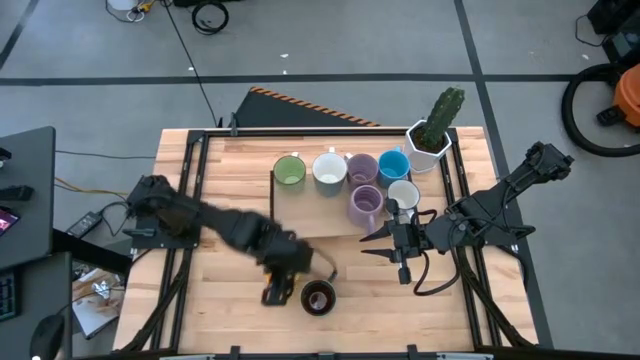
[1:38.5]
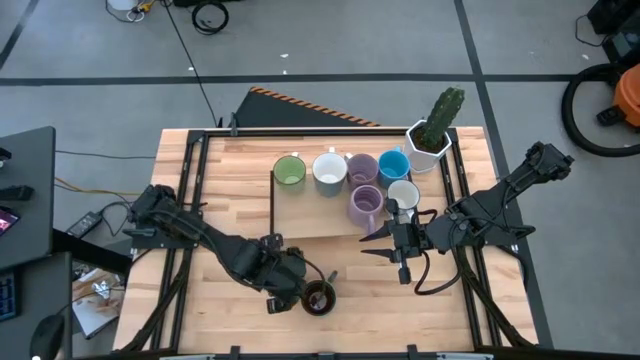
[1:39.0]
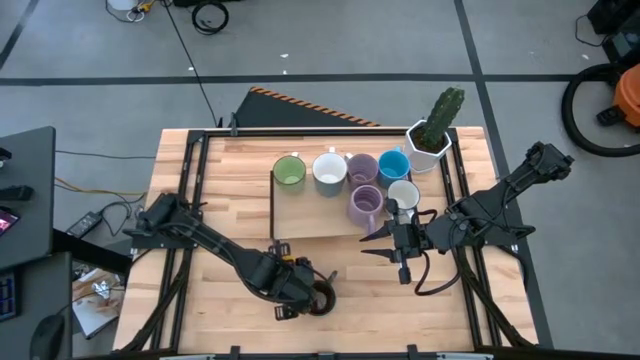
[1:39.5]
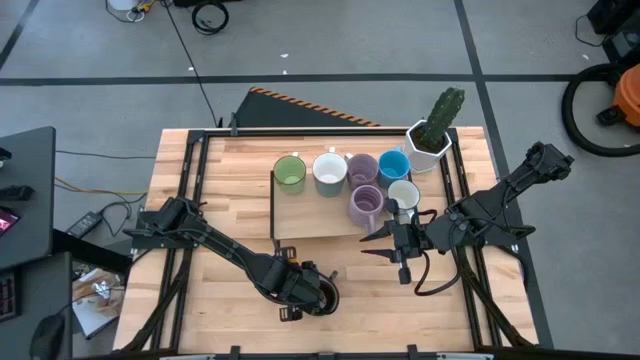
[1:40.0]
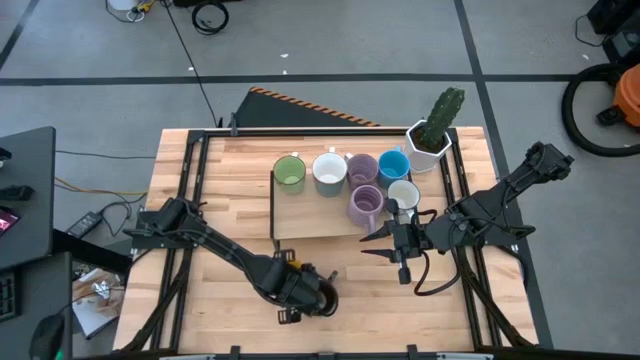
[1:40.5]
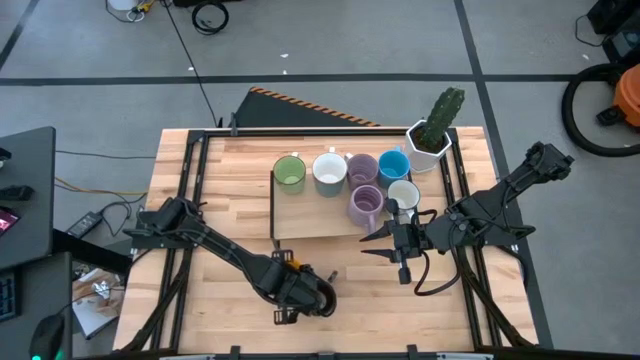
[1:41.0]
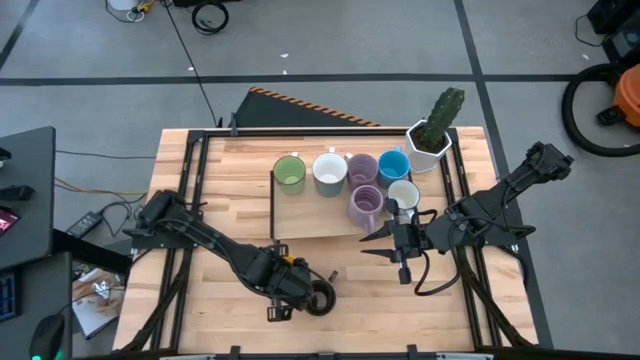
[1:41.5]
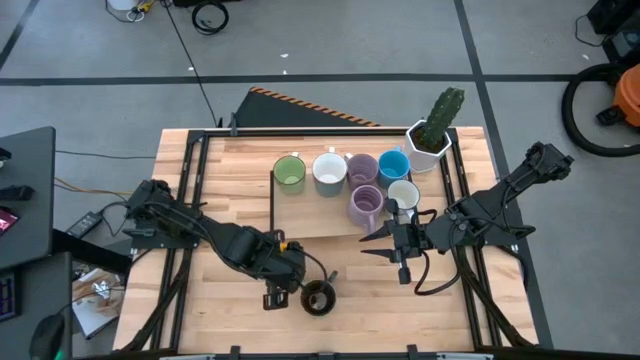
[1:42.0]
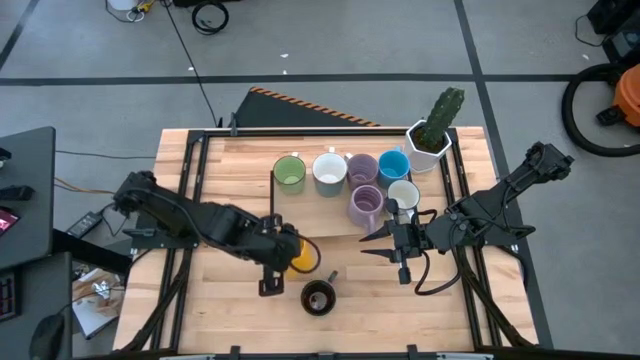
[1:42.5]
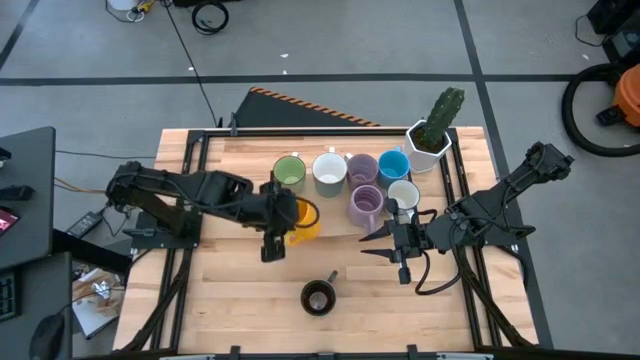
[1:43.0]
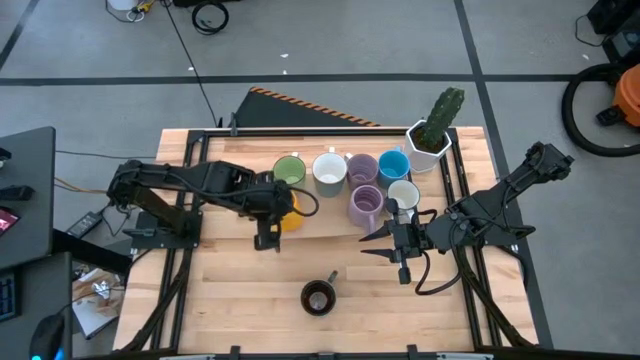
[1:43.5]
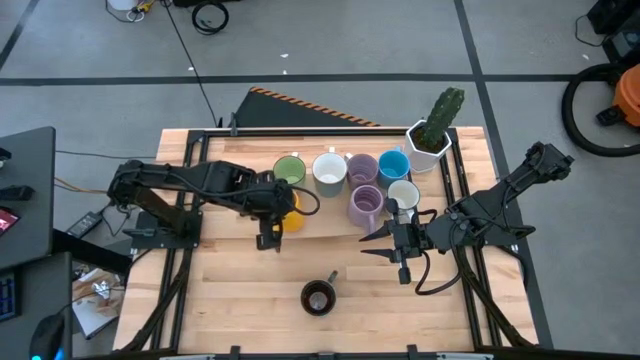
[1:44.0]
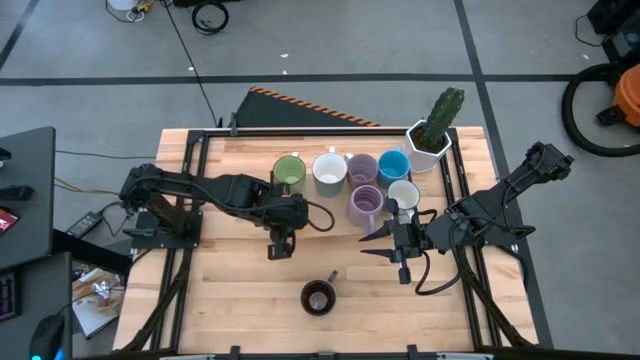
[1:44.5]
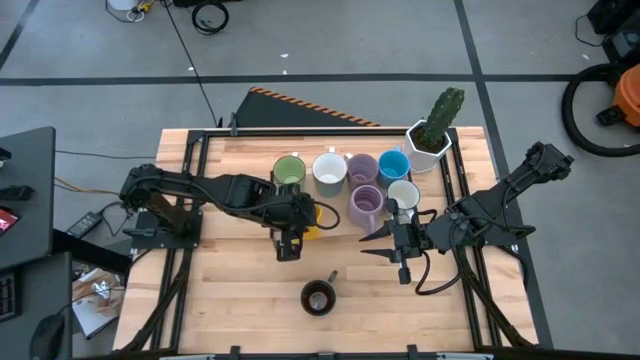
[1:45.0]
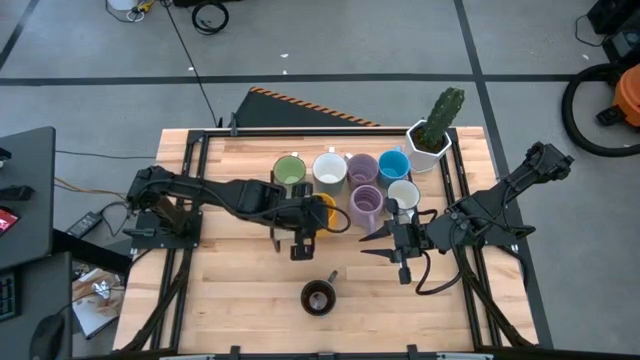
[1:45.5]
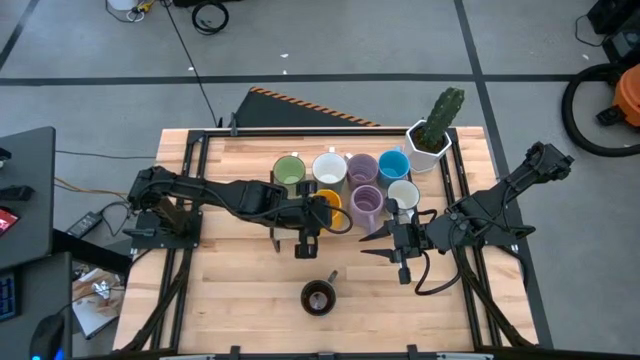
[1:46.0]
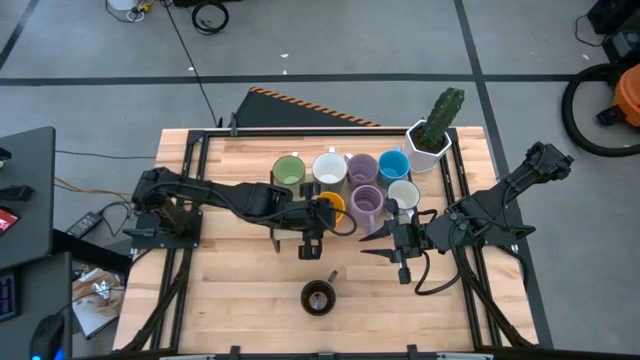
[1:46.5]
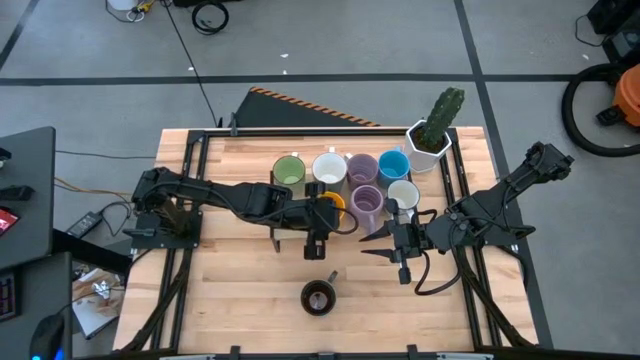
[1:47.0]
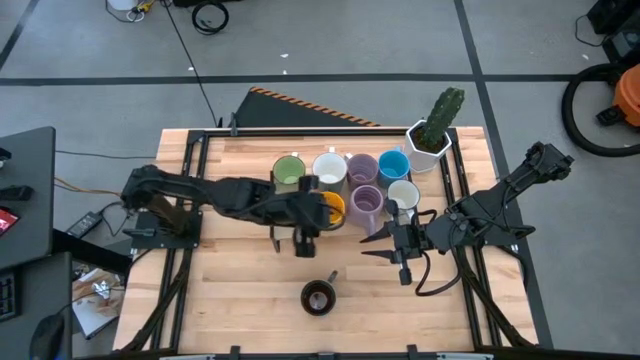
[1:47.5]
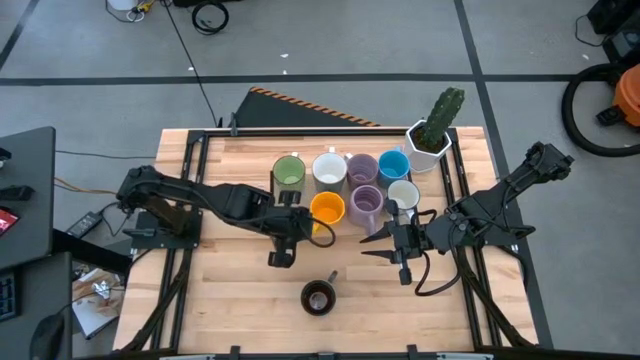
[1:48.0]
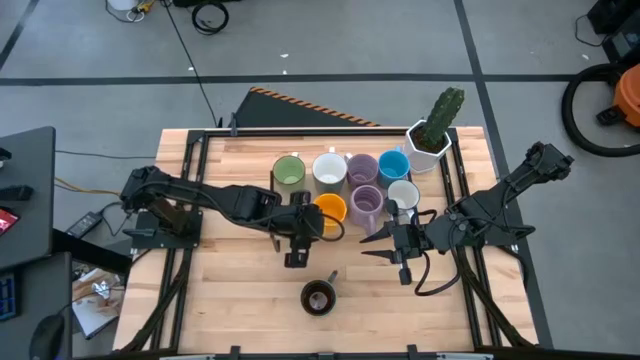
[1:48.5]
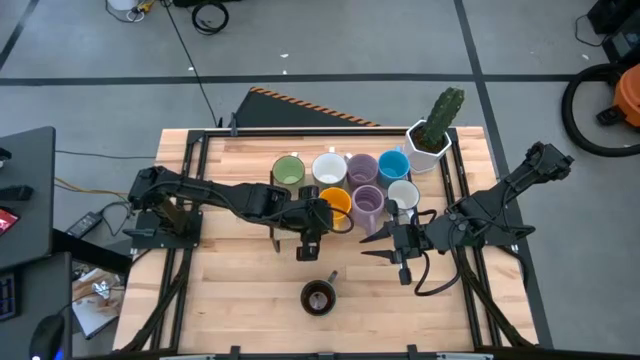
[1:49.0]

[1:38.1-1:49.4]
Task: Place coffee mugs
Put the yellow cup on the shelf aligned with the other light blue cup

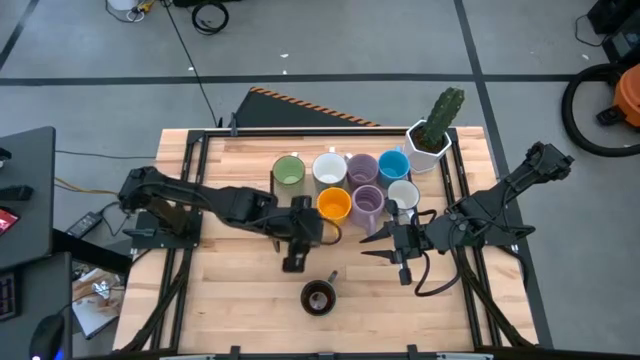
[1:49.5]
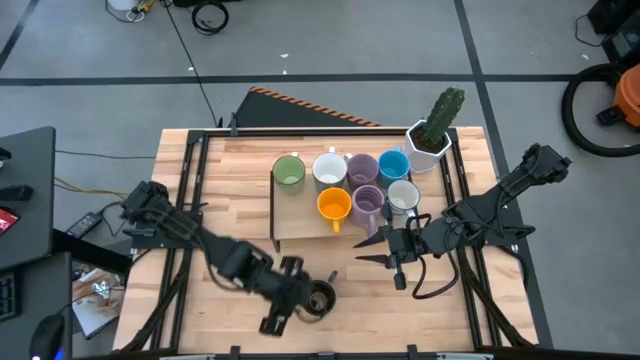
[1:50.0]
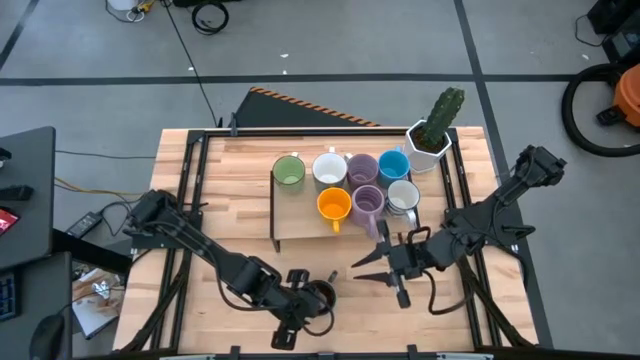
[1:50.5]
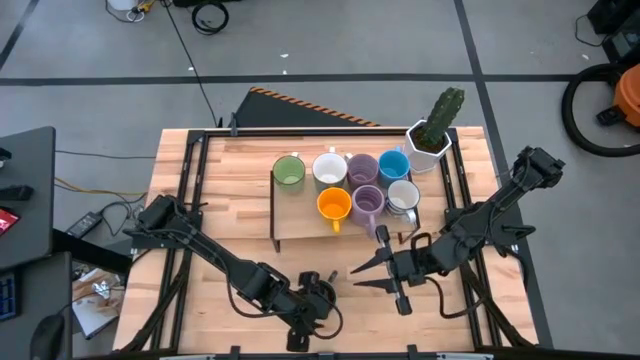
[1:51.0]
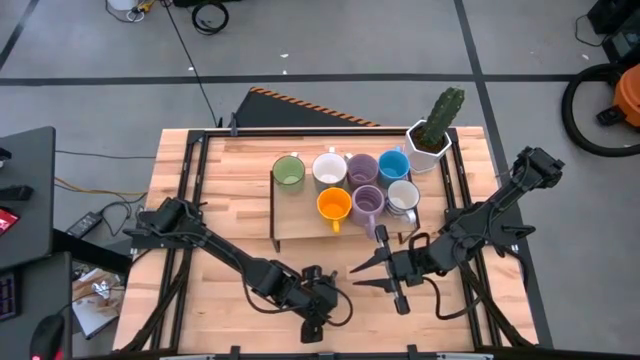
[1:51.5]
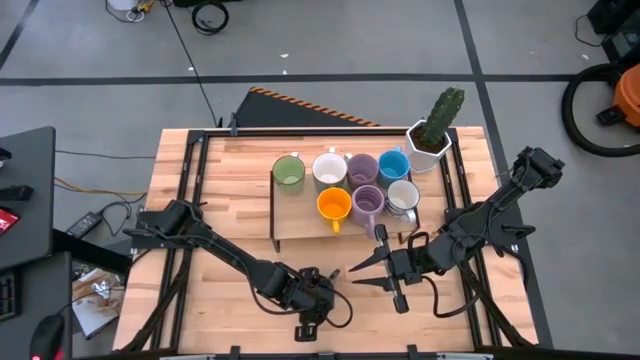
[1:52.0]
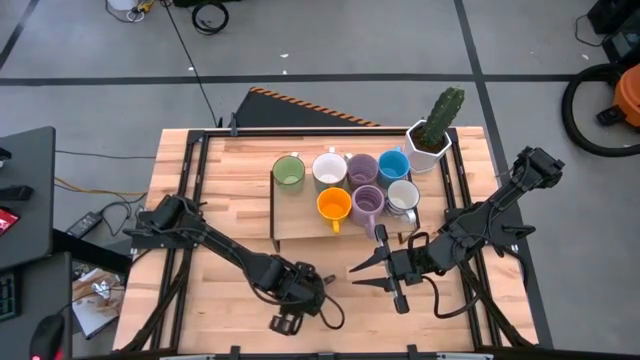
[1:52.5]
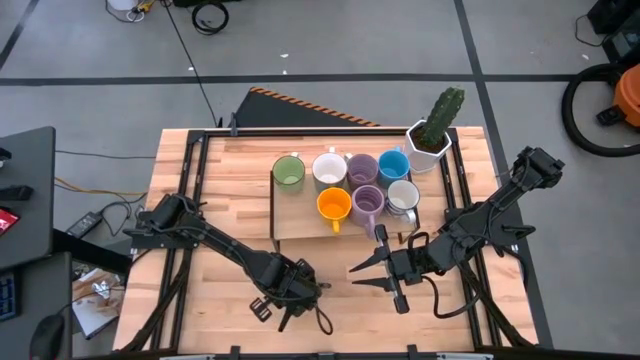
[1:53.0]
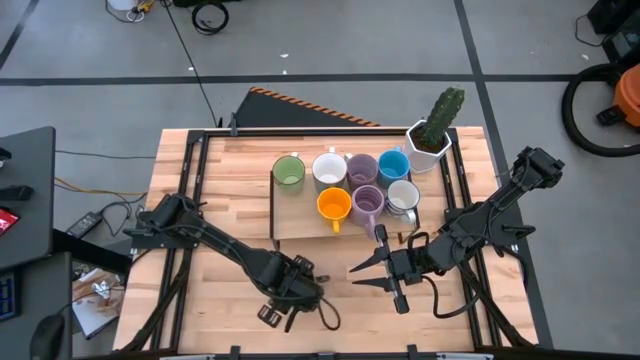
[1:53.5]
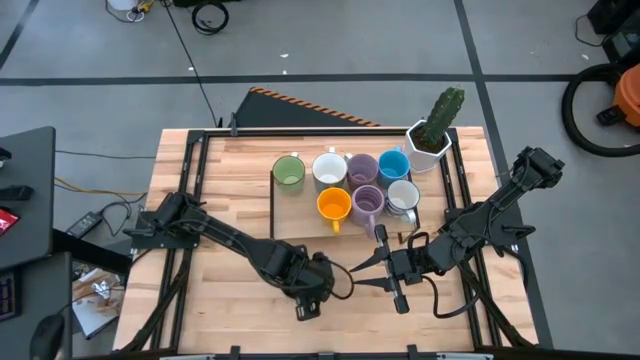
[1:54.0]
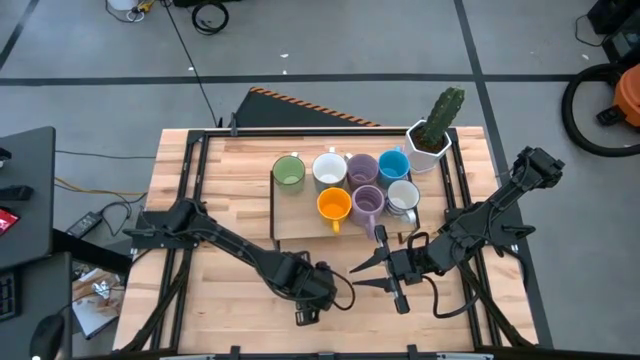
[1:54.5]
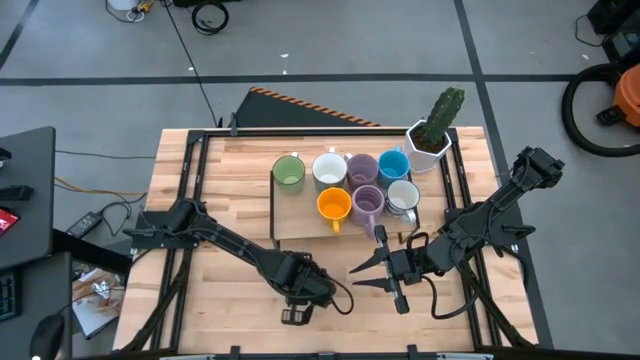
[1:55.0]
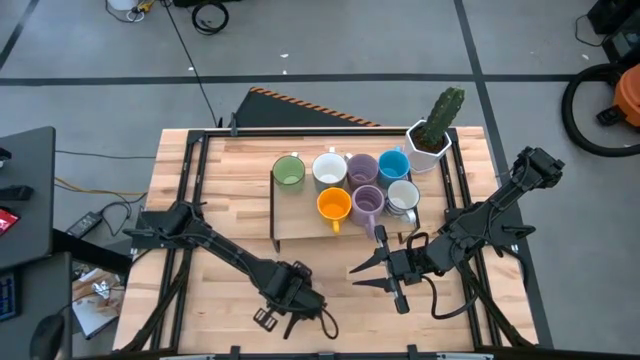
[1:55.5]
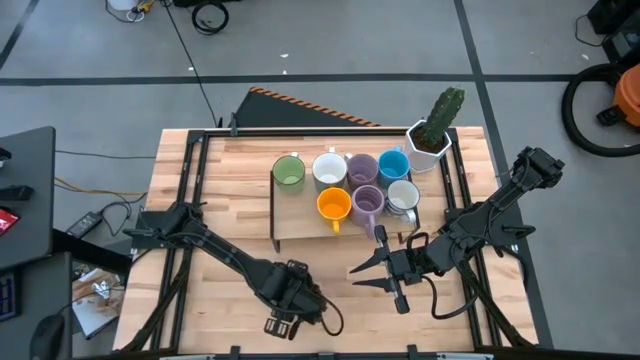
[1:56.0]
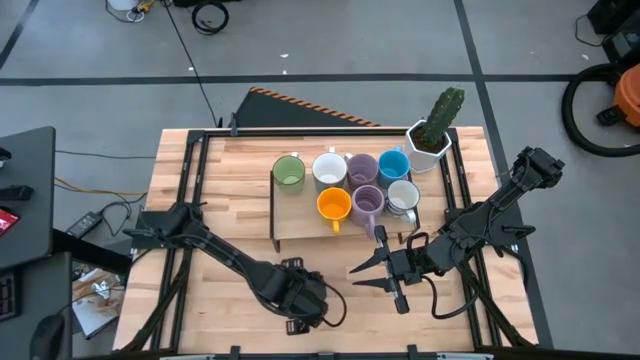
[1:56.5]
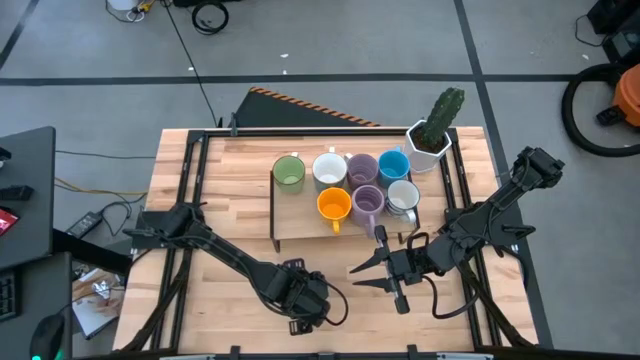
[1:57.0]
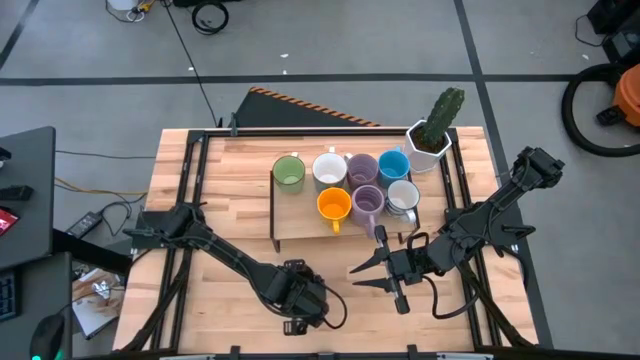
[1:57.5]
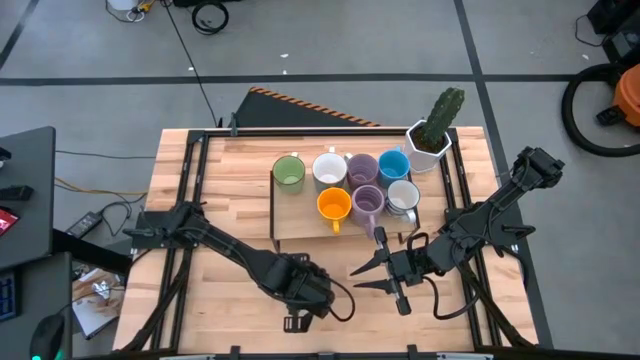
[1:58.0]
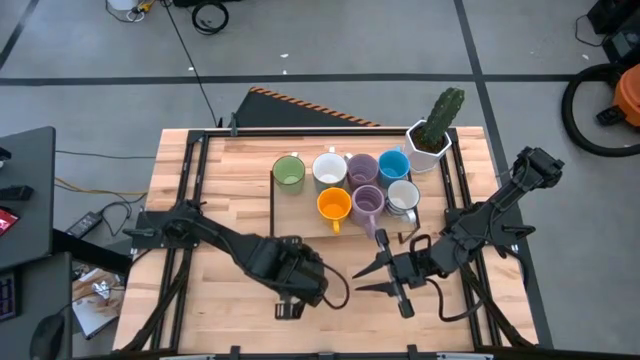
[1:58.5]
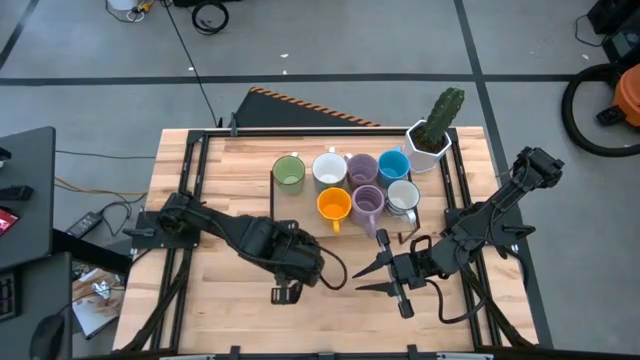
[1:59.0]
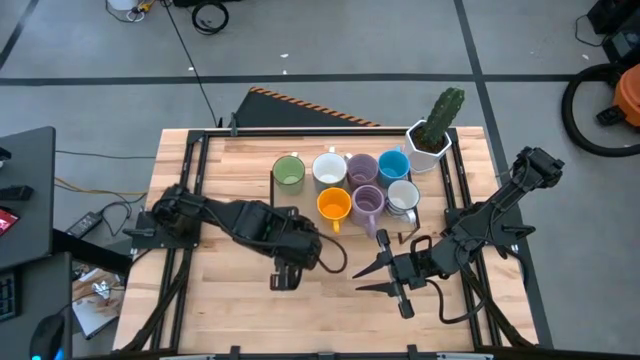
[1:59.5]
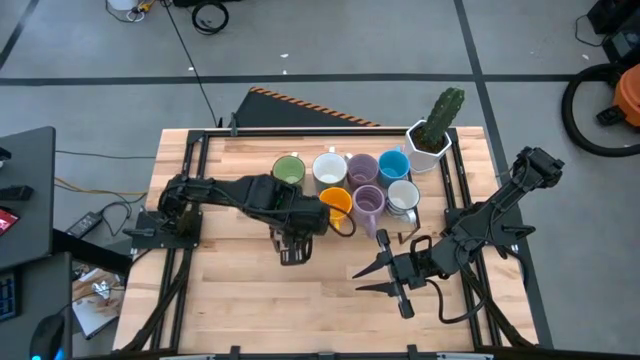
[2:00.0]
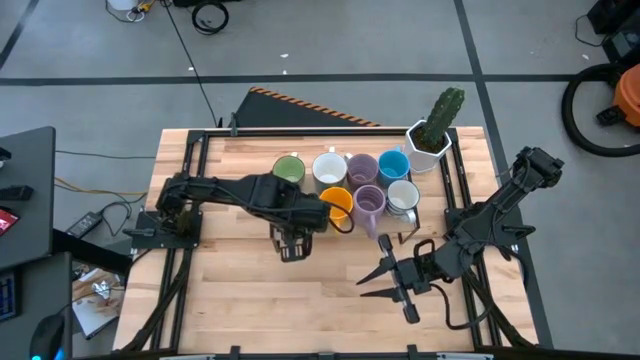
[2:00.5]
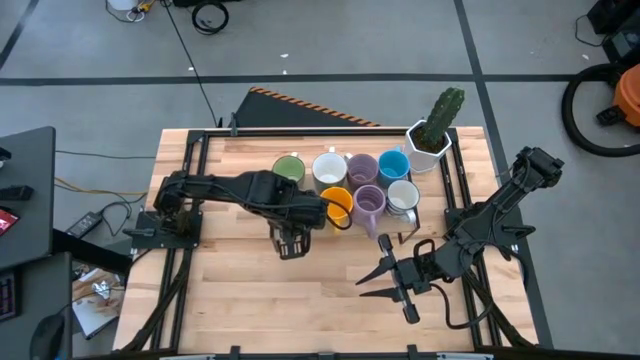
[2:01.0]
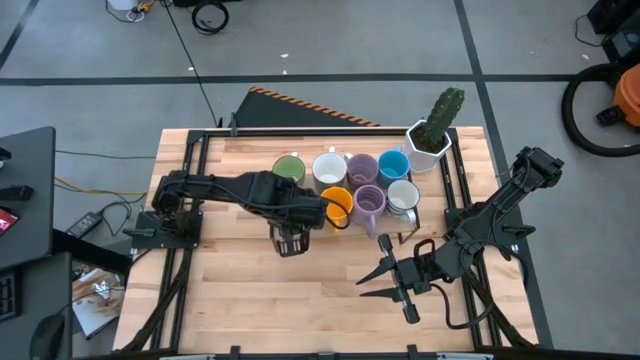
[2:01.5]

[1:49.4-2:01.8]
Put the brown cup on the shelf aligned with the other green cup
